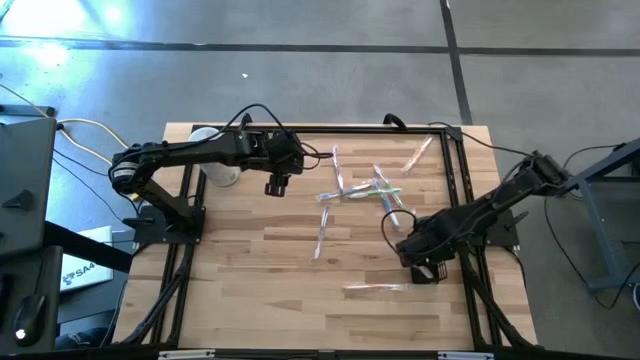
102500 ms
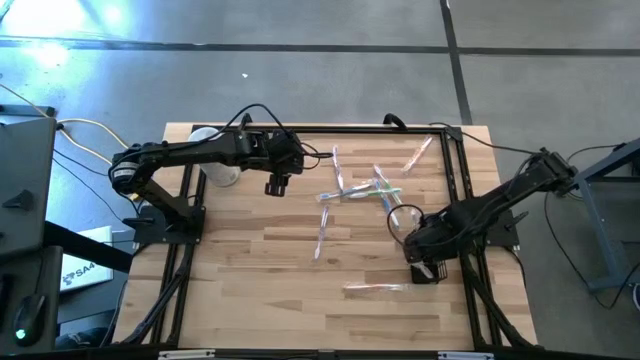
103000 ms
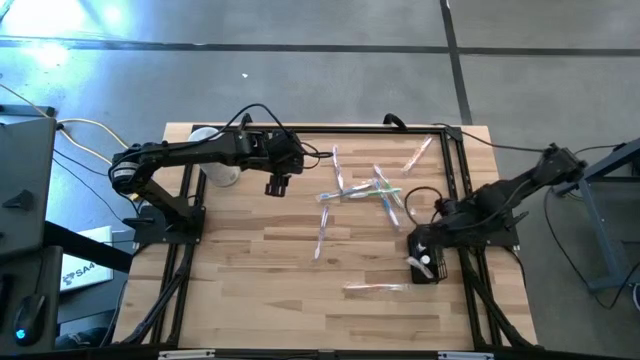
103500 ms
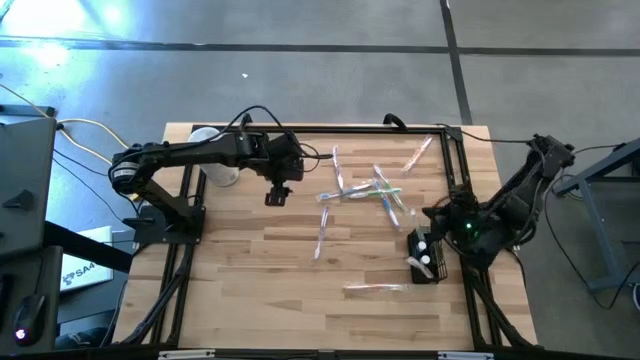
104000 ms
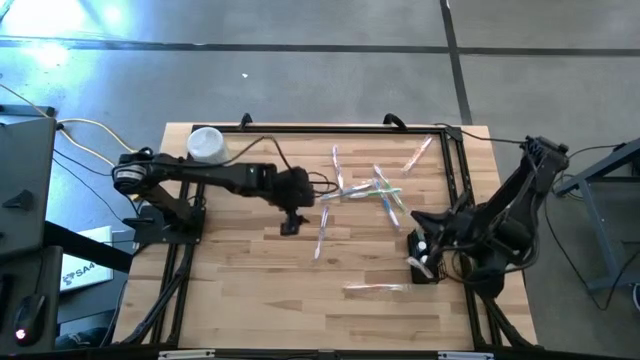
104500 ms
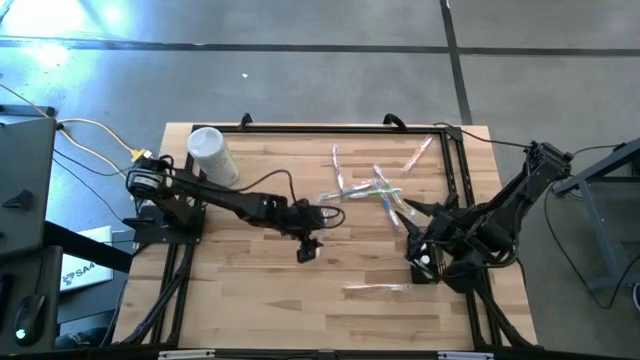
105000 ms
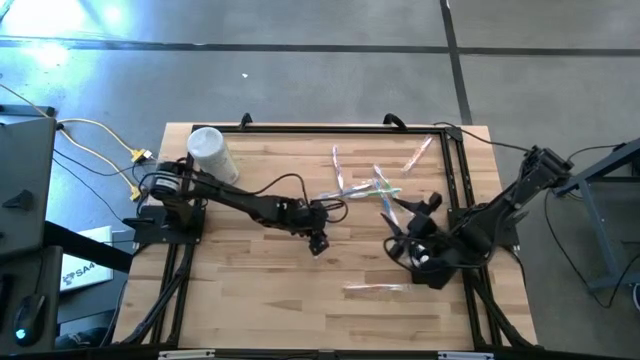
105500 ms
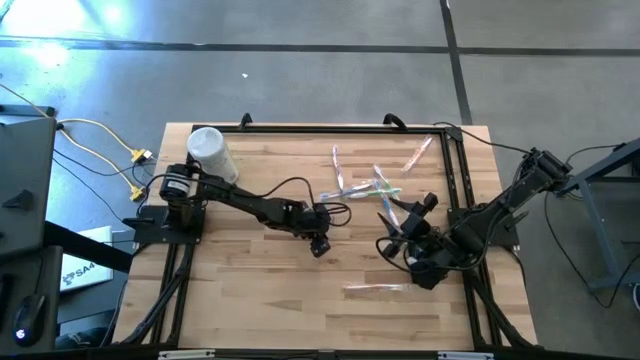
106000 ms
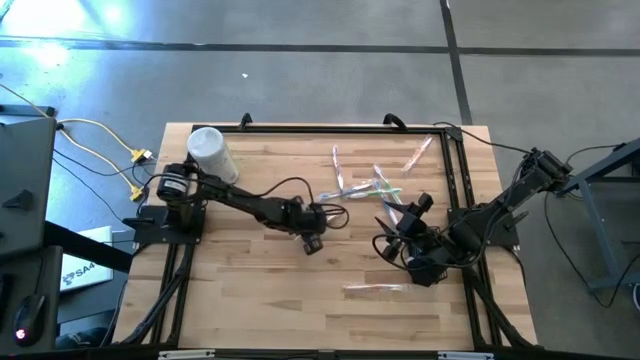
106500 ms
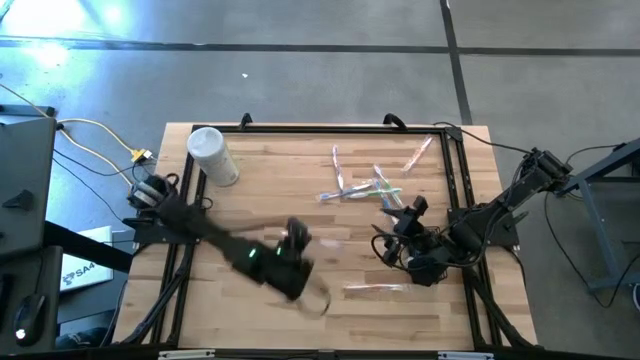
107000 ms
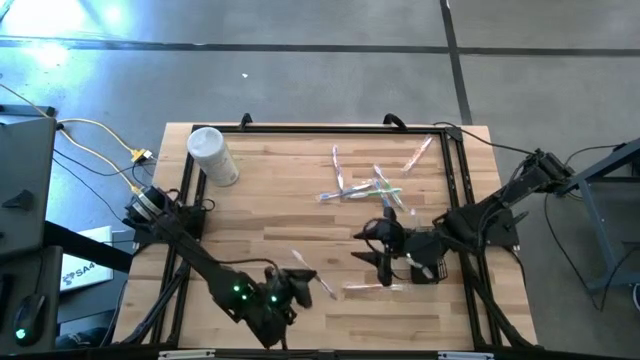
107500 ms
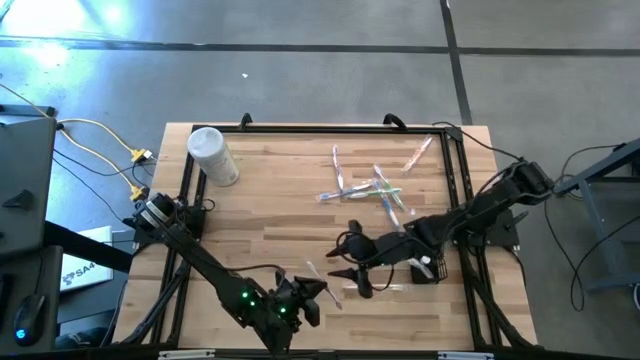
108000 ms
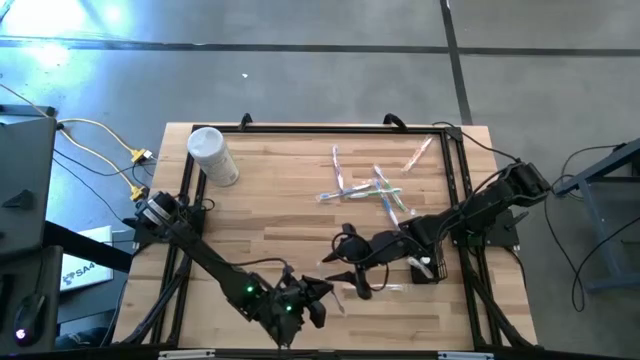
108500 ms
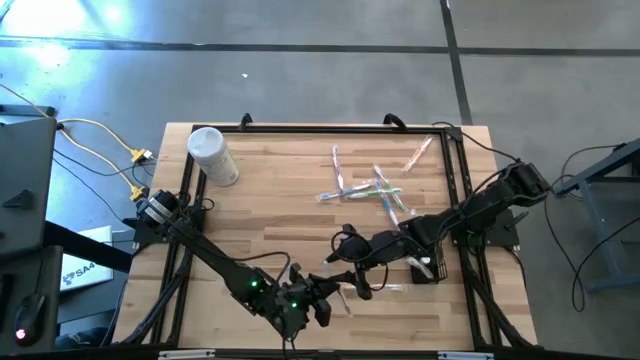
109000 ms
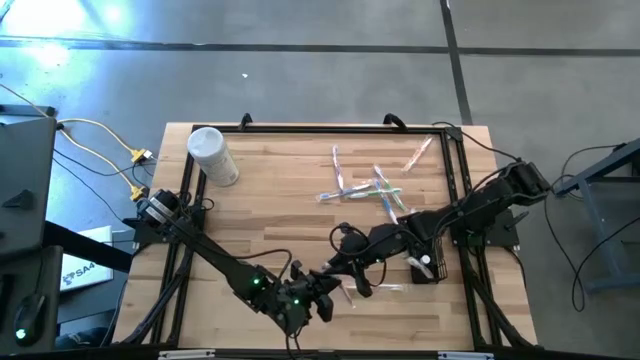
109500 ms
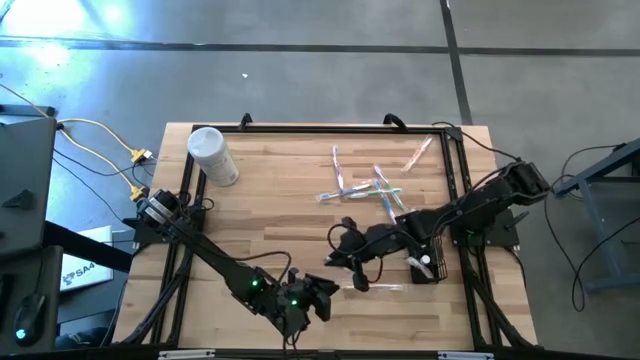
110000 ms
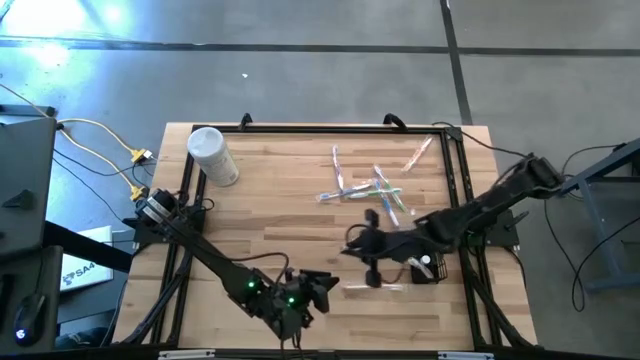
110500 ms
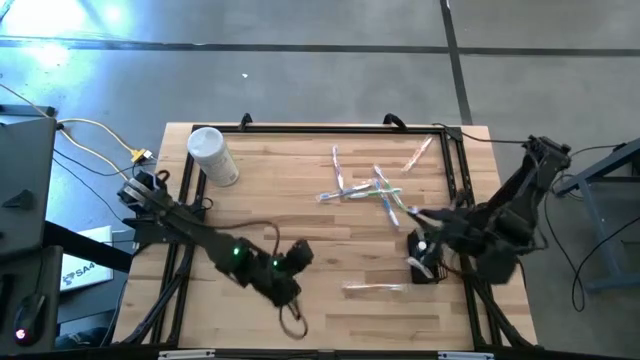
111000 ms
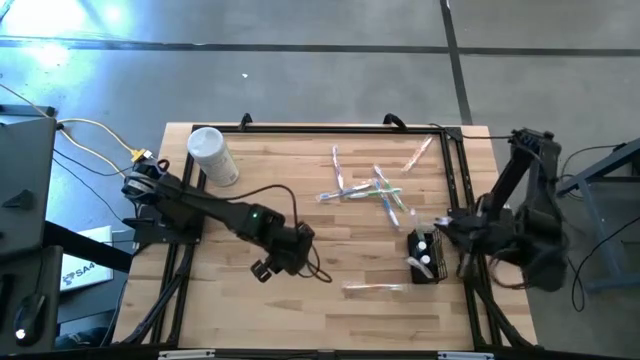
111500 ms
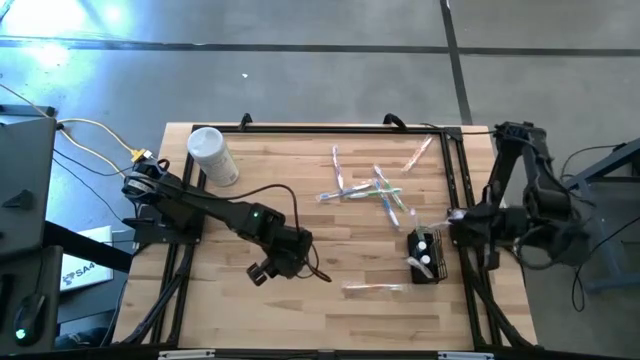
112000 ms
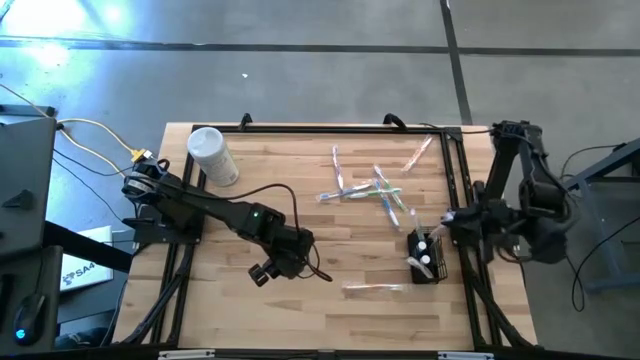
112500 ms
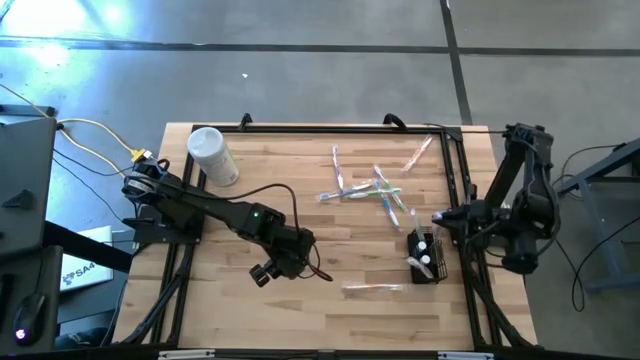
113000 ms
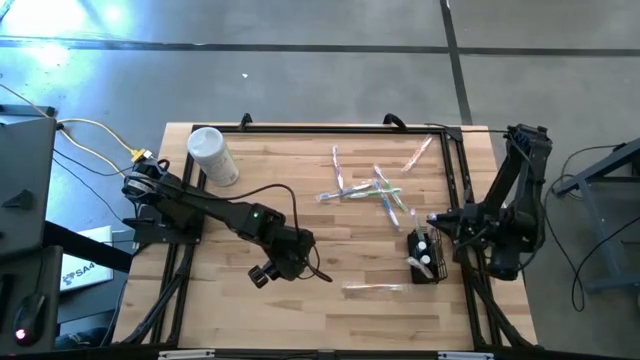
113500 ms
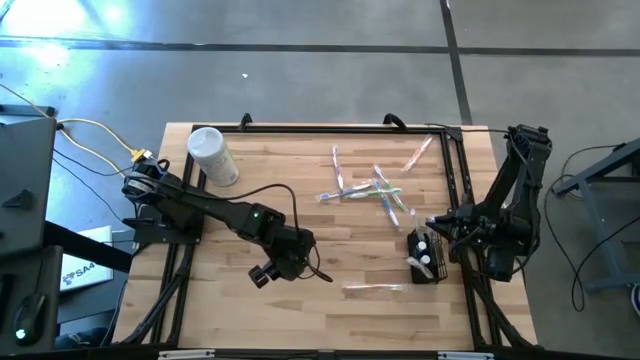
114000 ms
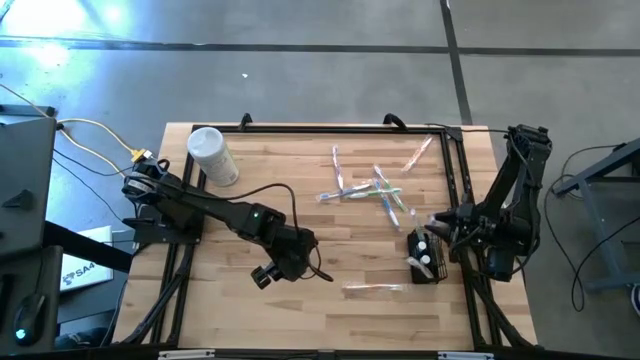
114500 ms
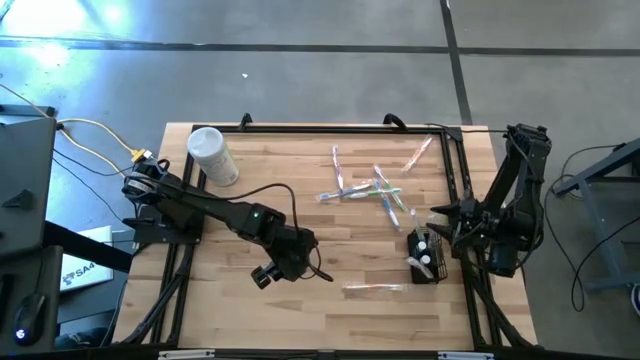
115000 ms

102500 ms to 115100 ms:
Task: Pick & Place toothbrushing station
Put the bottom purple toothbrush into the black mesh organizer

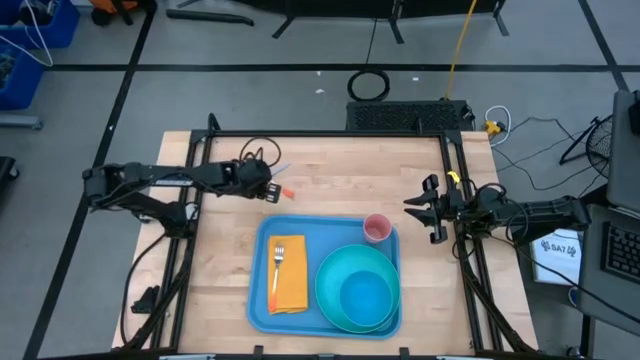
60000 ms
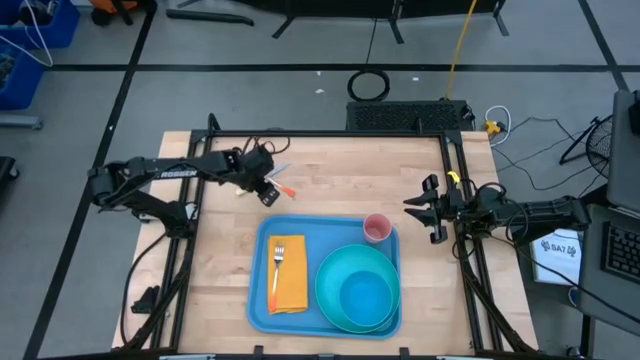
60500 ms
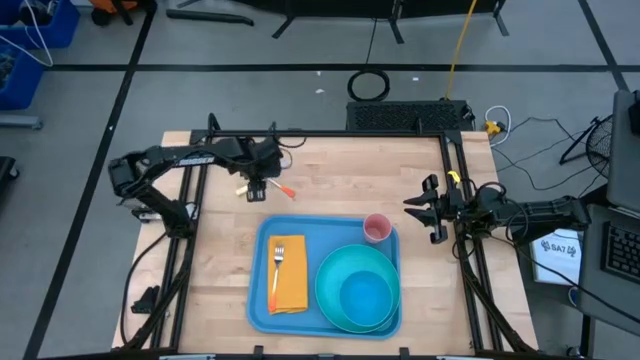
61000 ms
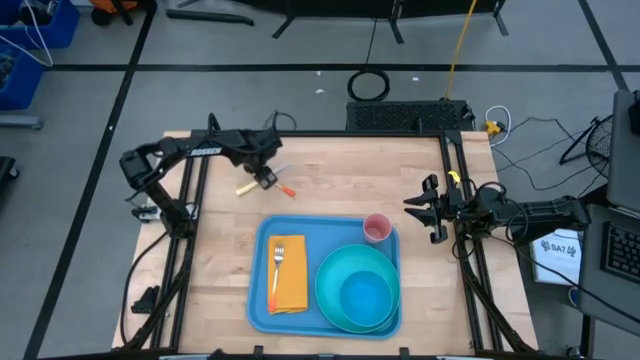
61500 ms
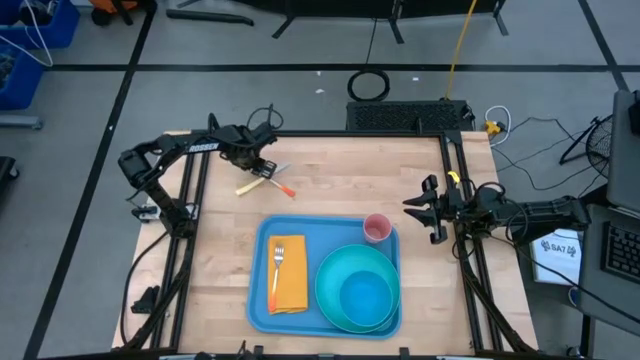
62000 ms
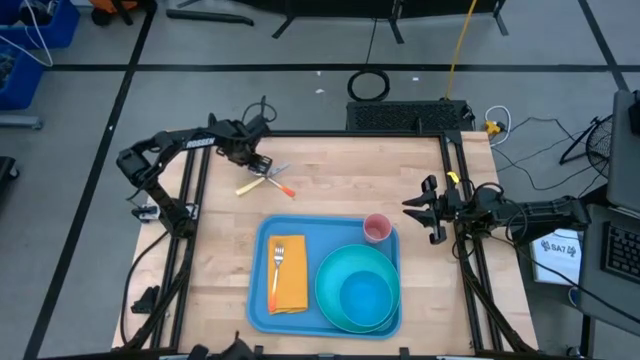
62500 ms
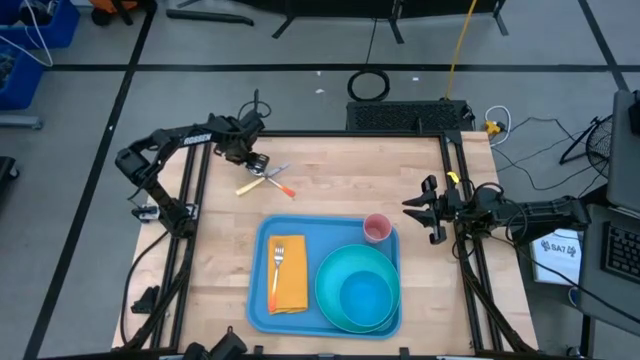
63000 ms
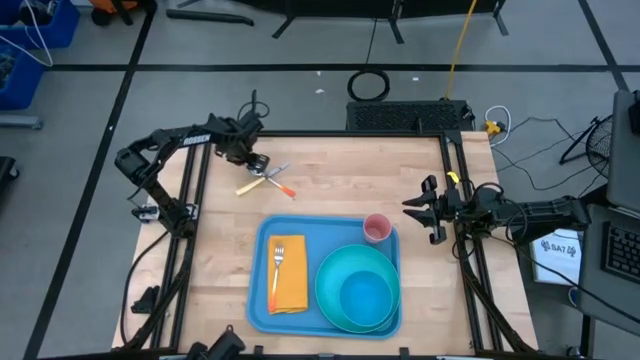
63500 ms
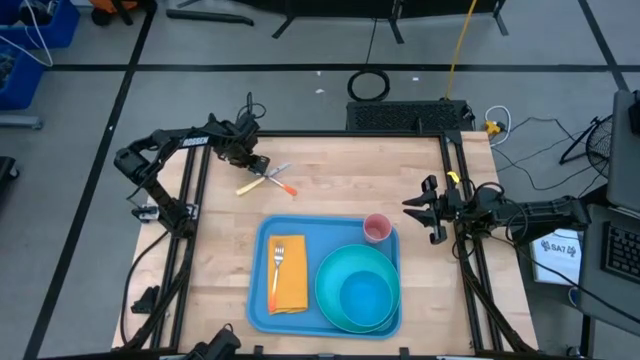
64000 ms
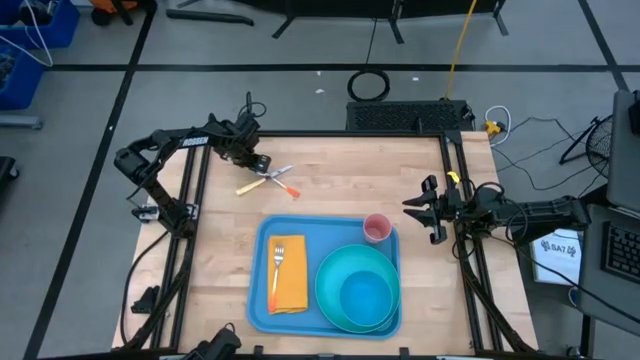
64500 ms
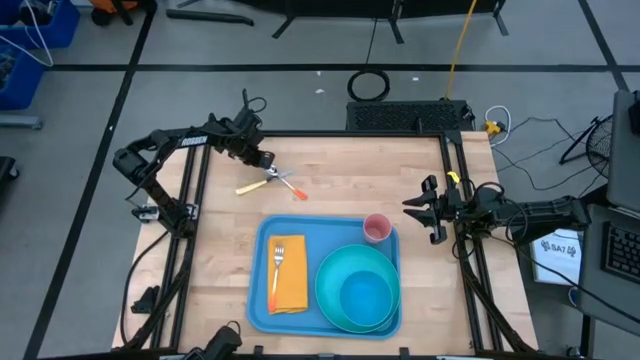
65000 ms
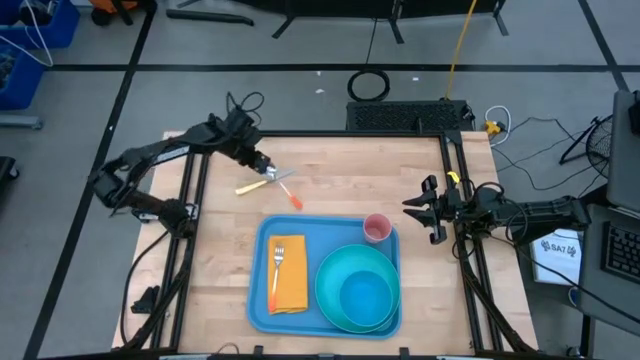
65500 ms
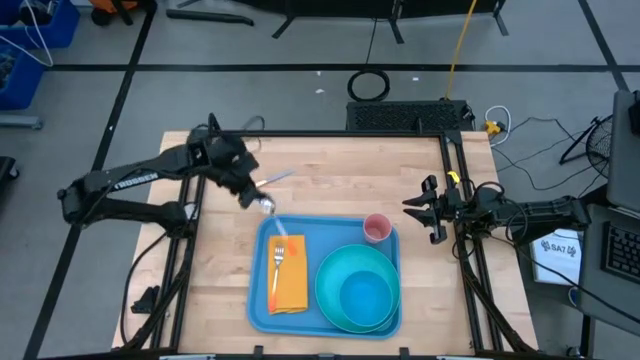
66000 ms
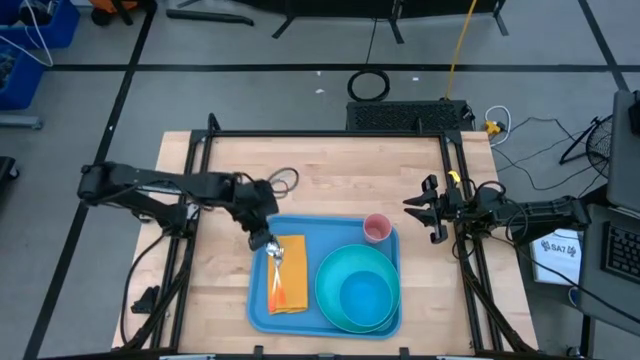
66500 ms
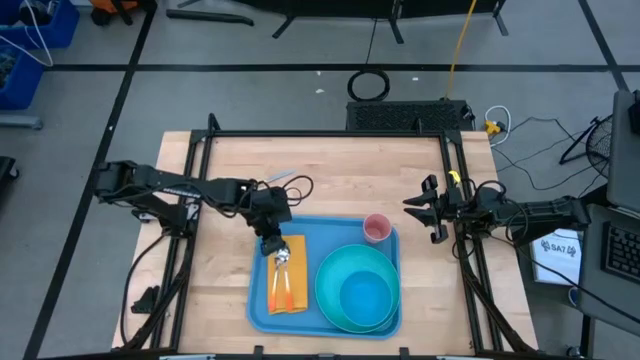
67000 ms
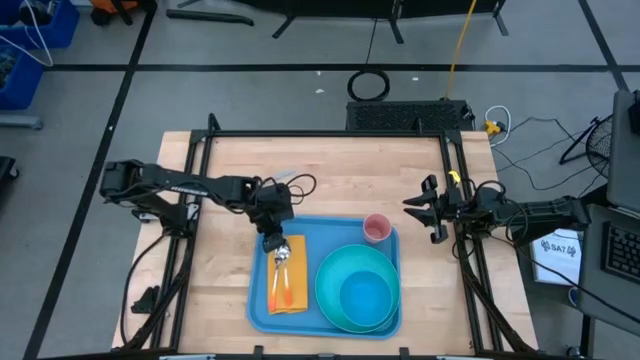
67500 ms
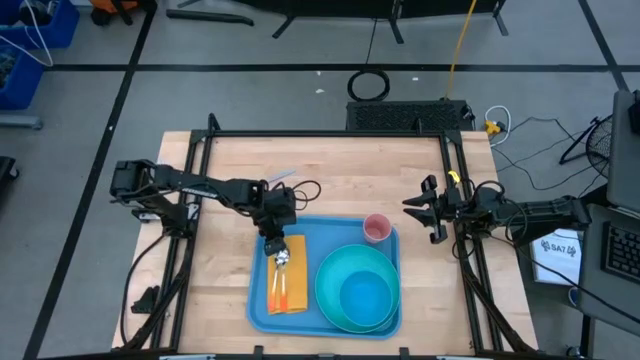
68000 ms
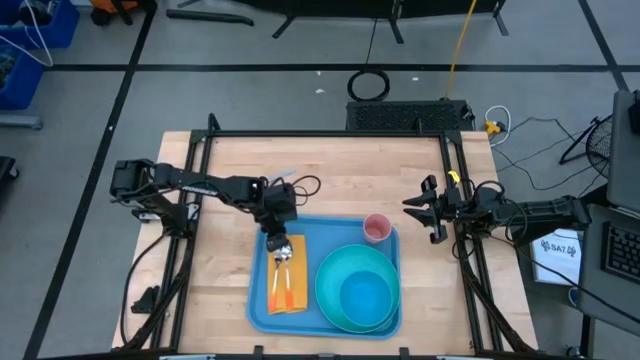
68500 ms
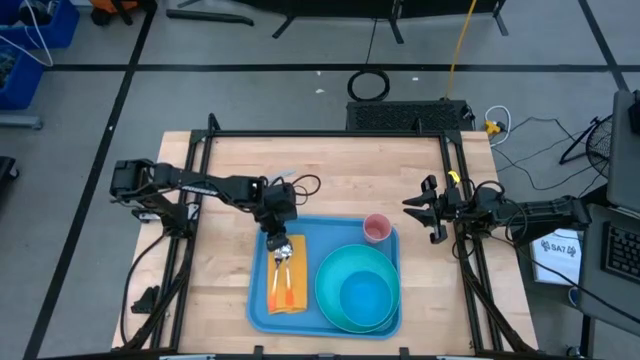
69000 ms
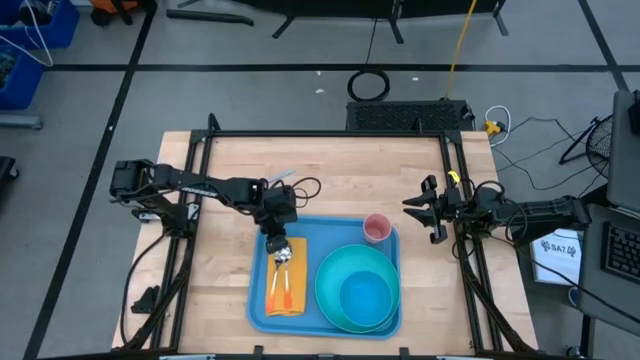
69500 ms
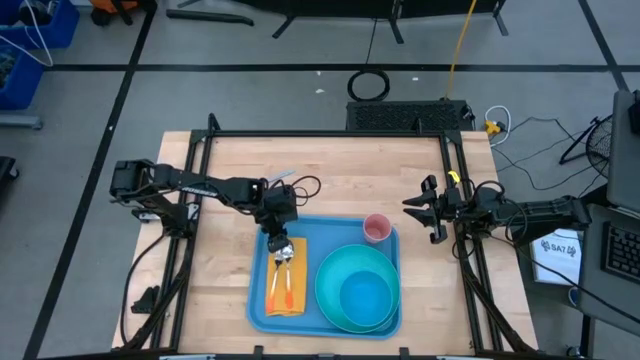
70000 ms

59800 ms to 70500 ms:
Task: Set up tray
Put the orange spoon on the yellow napkin to the right of the orange fork
